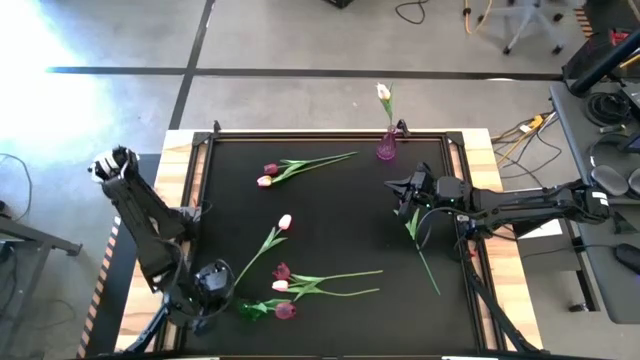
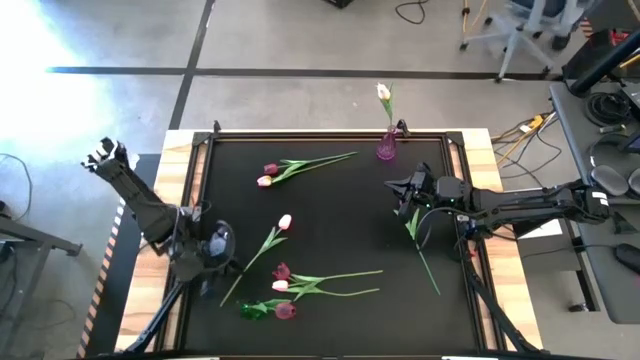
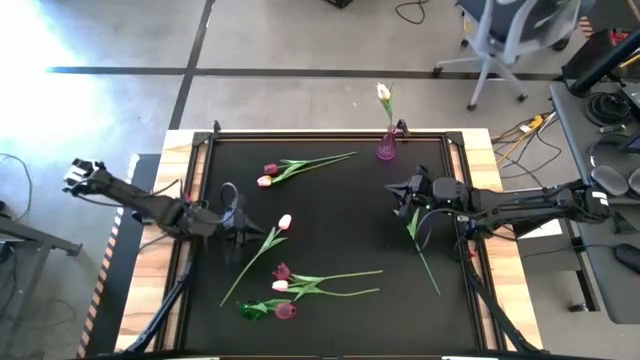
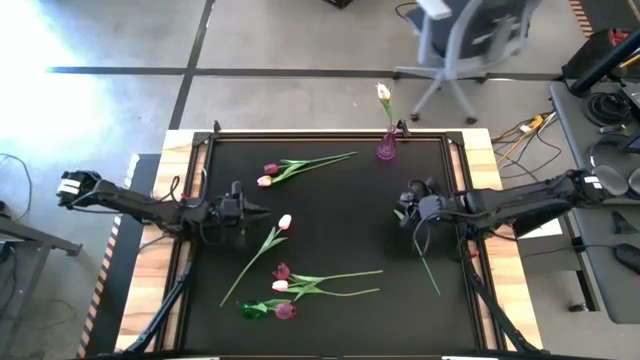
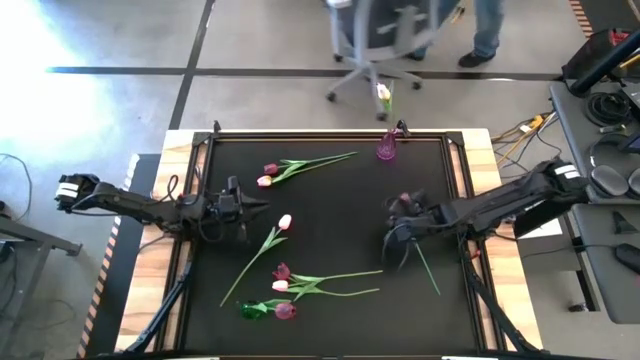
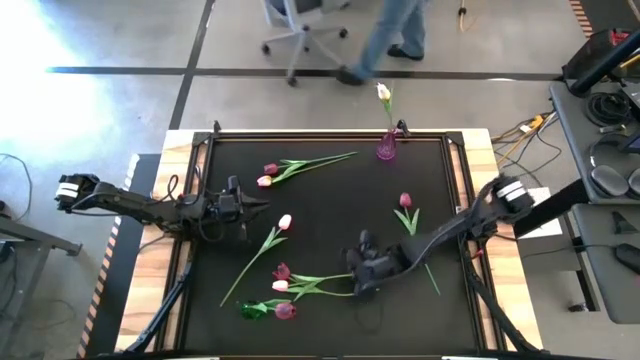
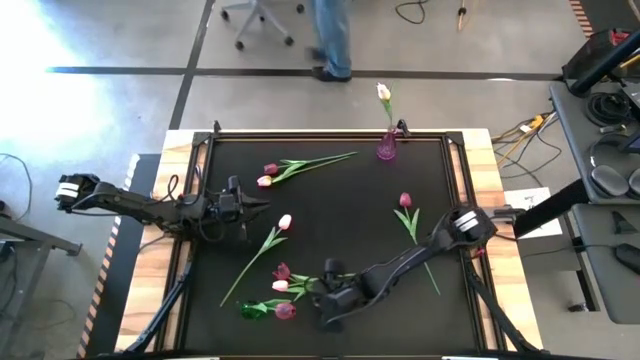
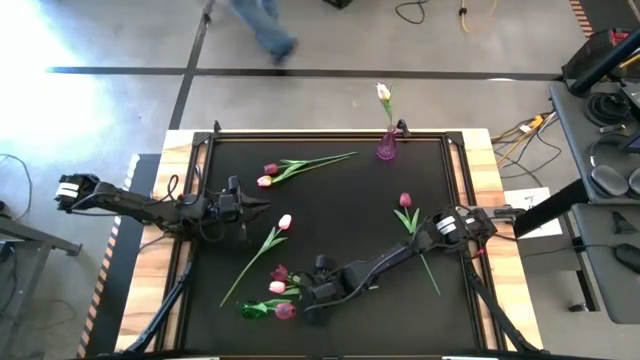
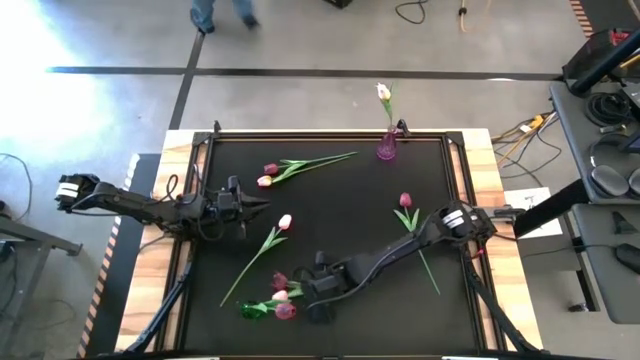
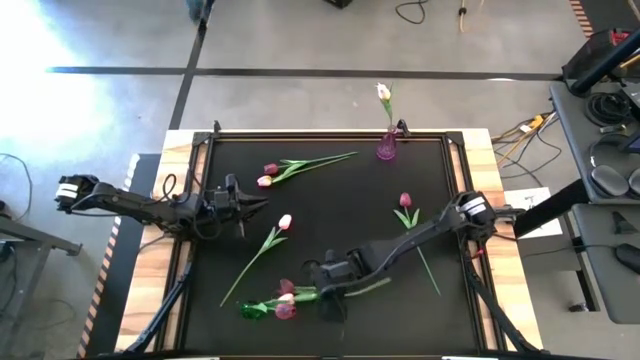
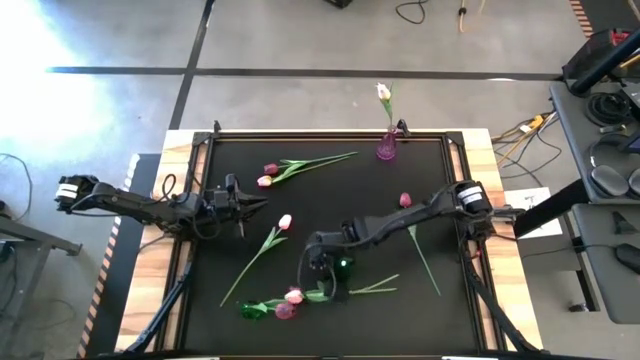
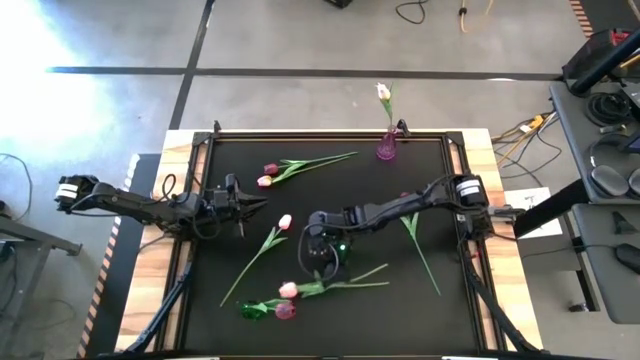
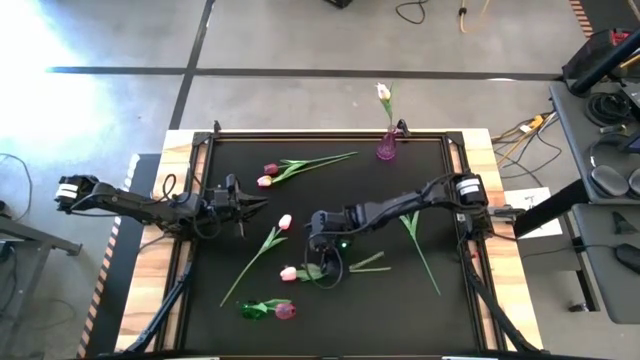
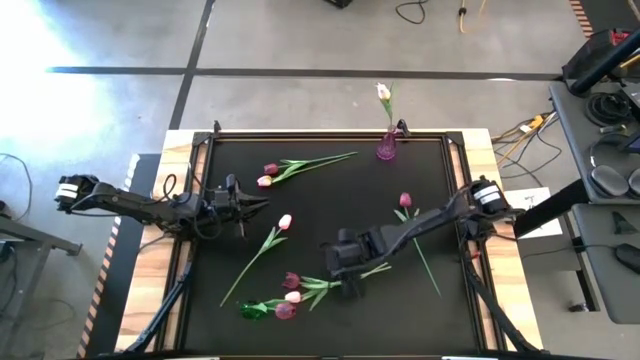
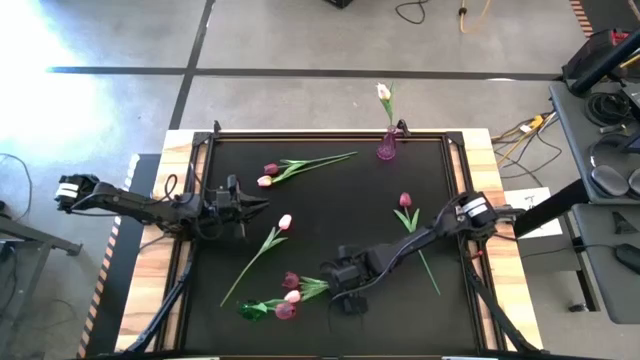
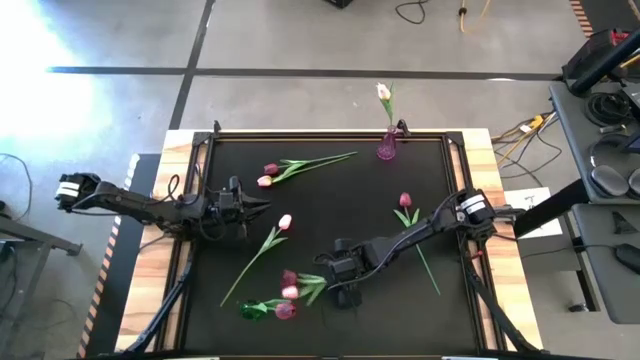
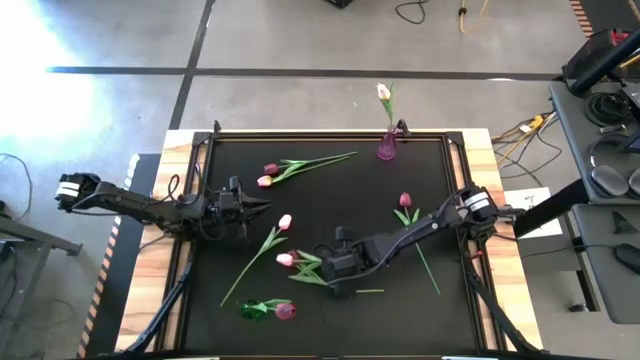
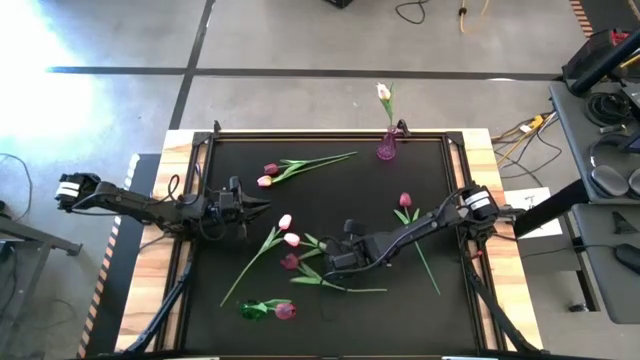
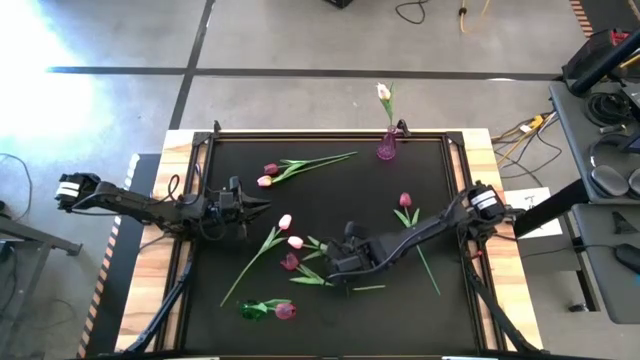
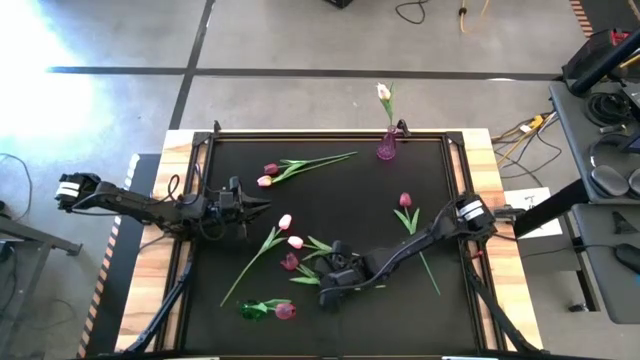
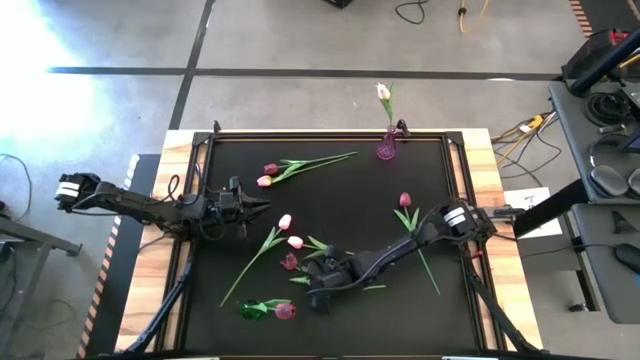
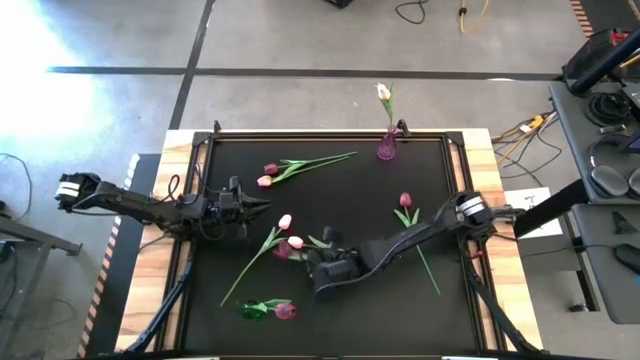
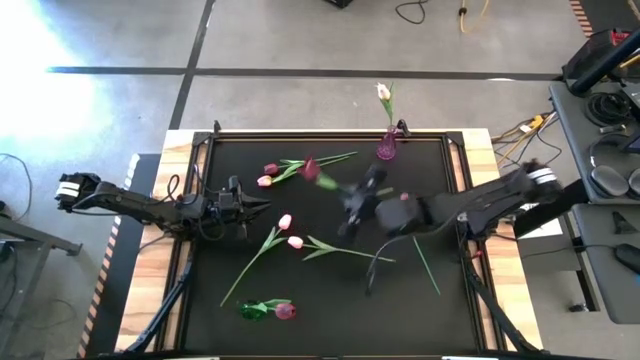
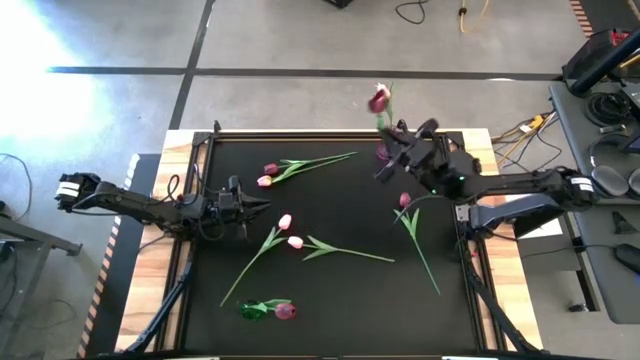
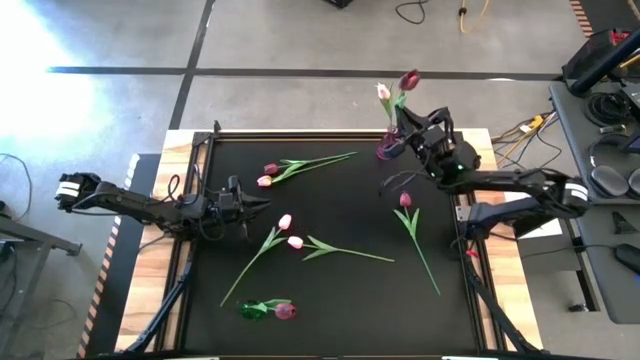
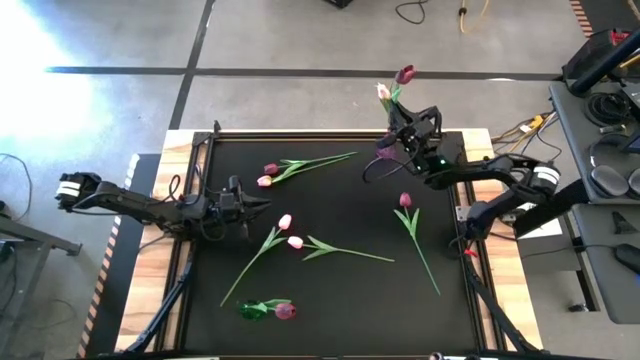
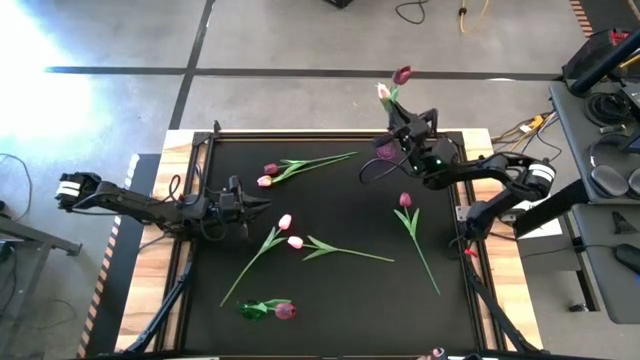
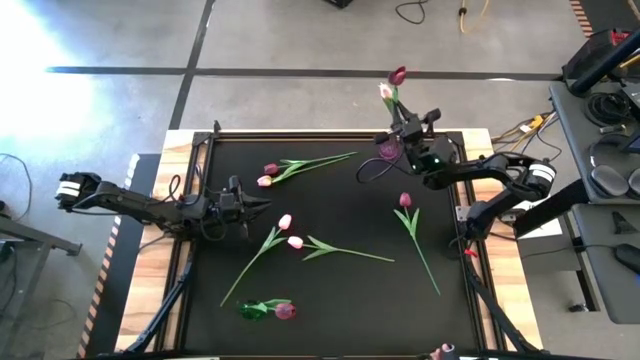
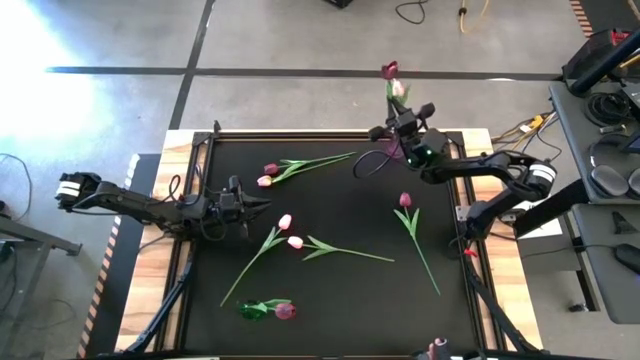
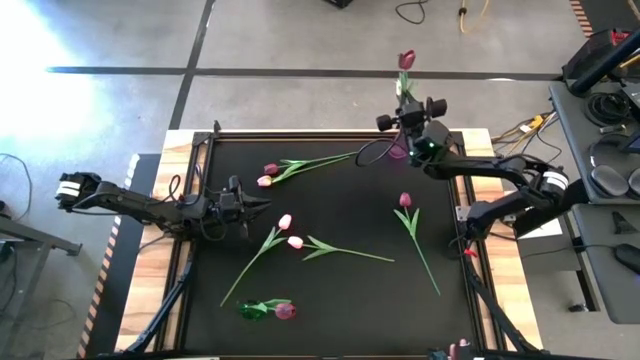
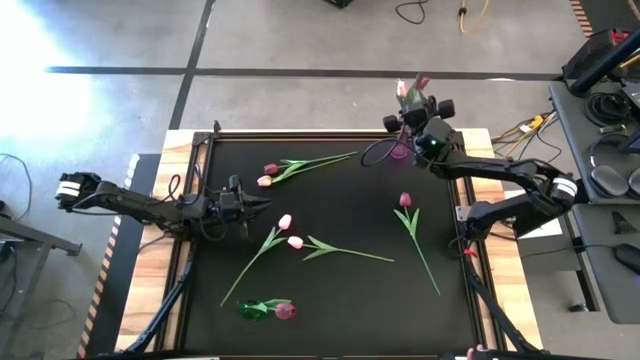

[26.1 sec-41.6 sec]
Task: Sort flowers into vase by color
Put the red flower into the green vase

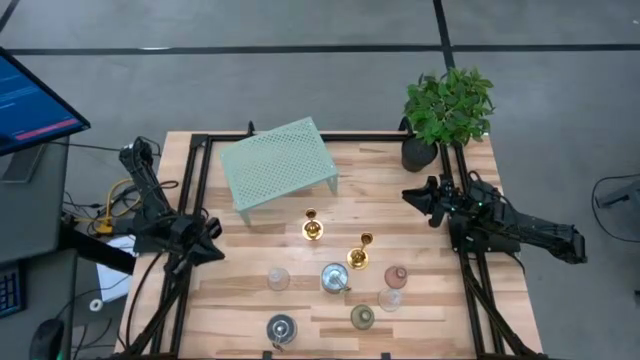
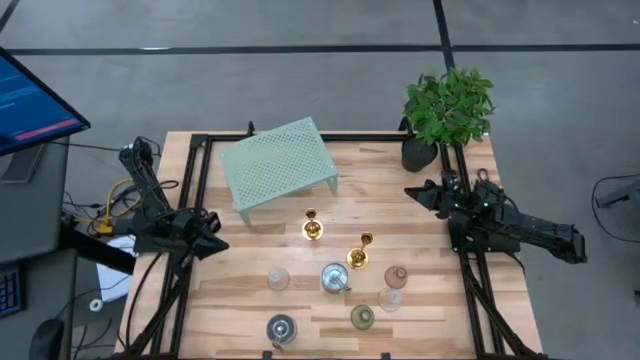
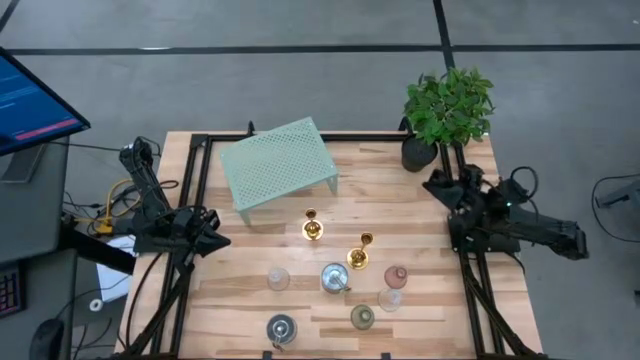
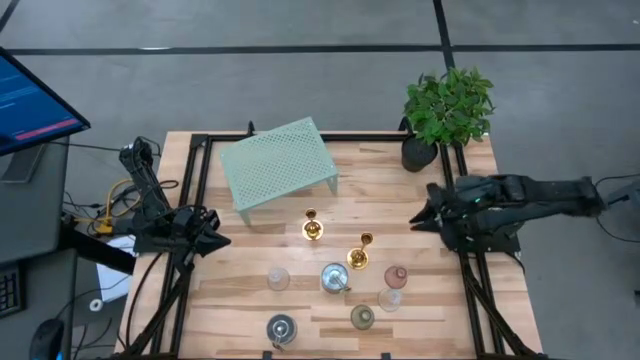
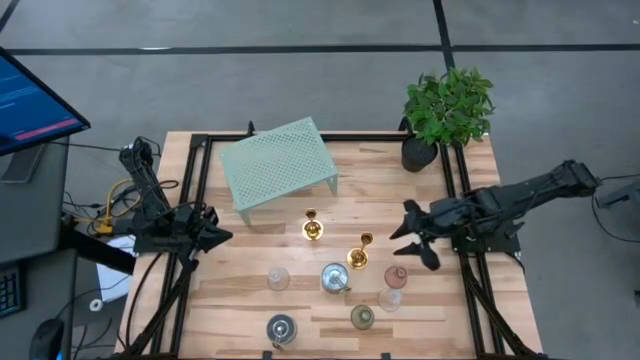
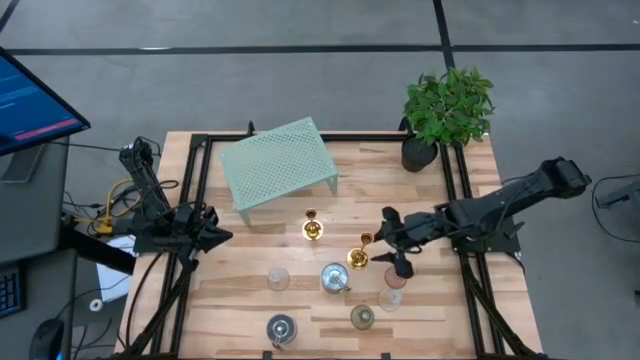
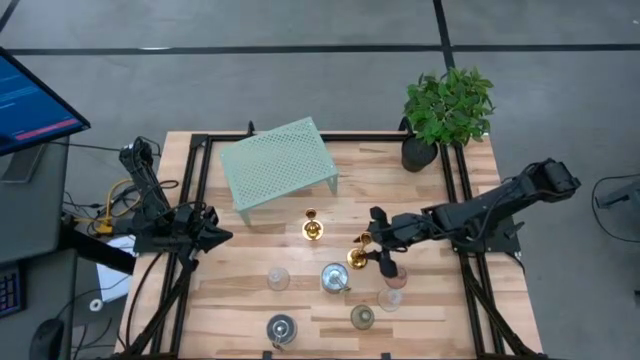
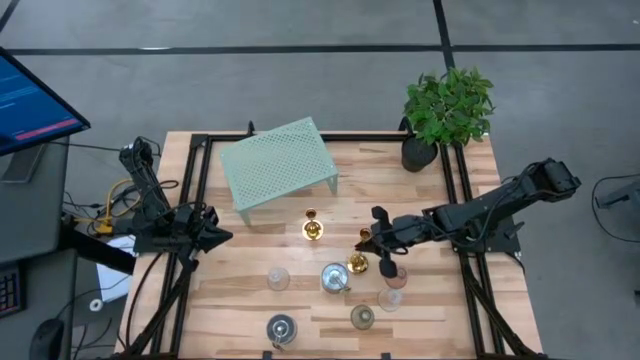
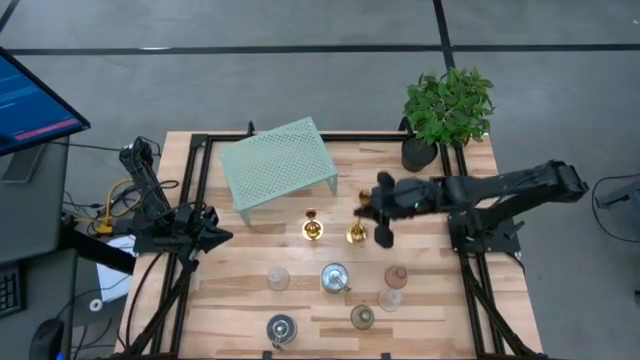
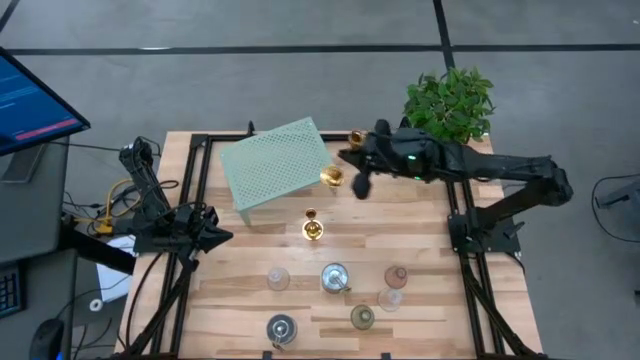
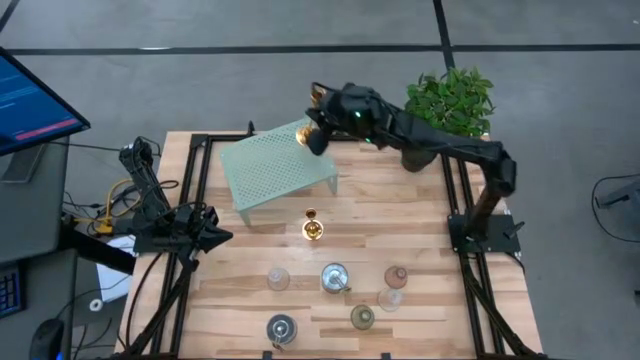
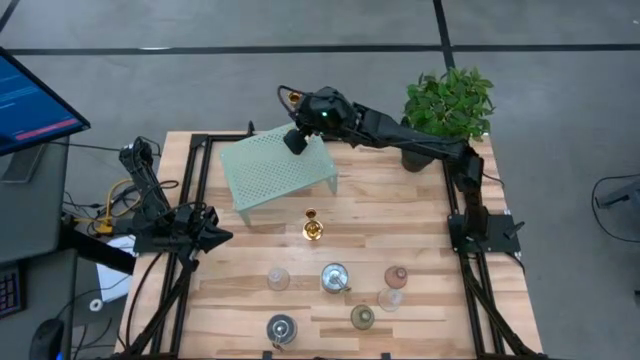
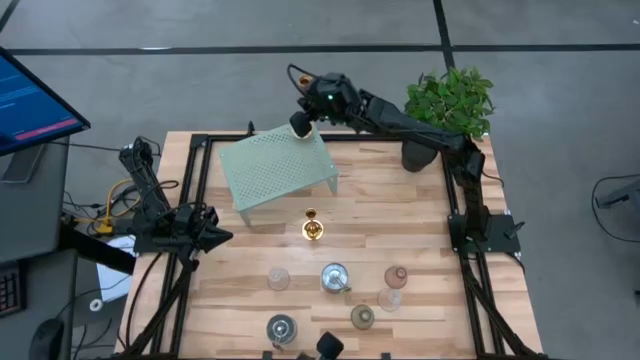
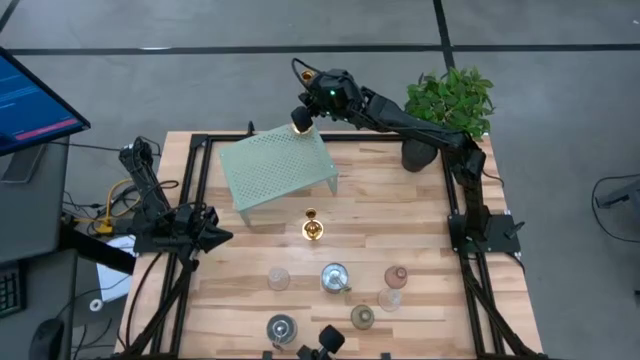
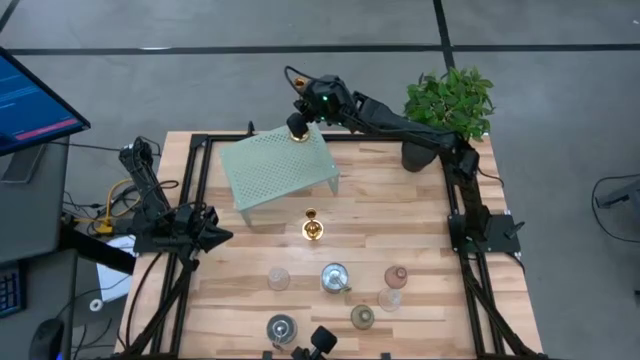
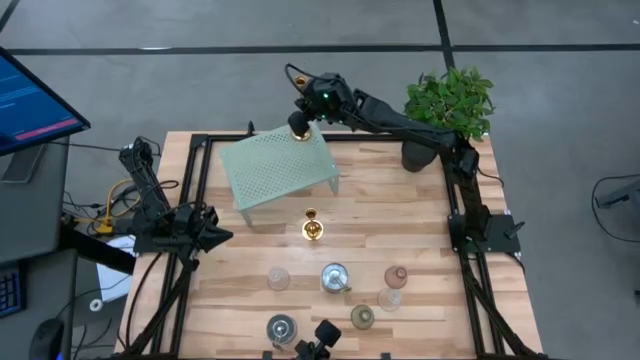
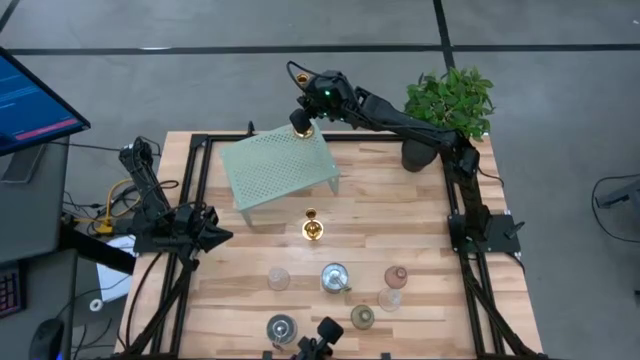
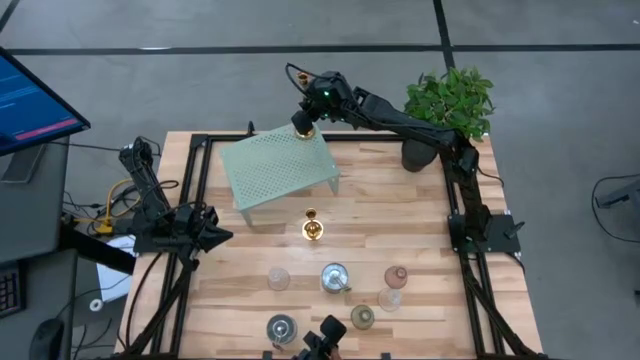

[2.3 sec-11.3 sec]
Task: Pick & Place candle stick holders
Put the right gold candle holder on the shelf
